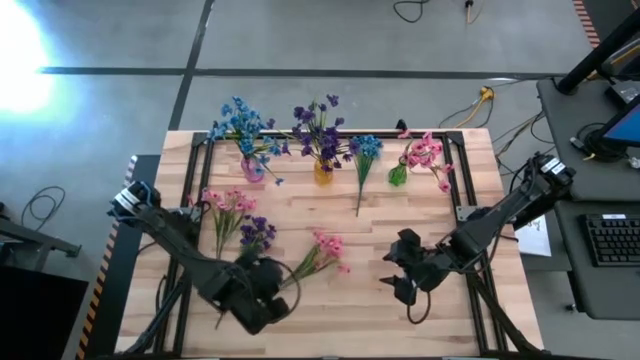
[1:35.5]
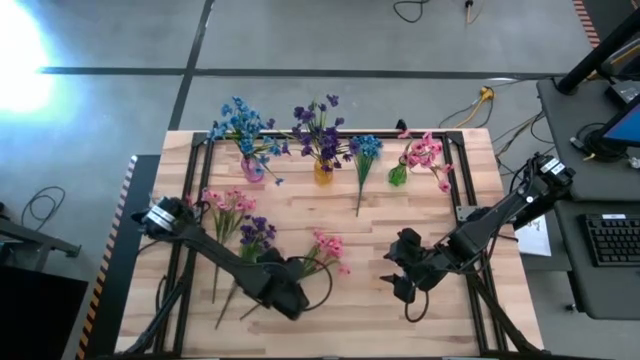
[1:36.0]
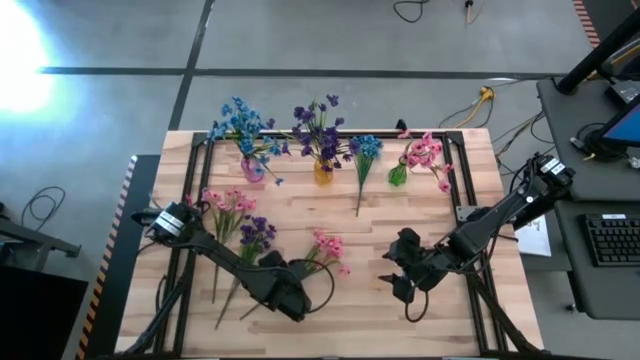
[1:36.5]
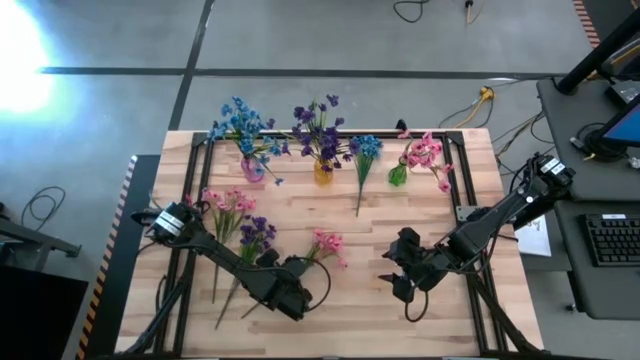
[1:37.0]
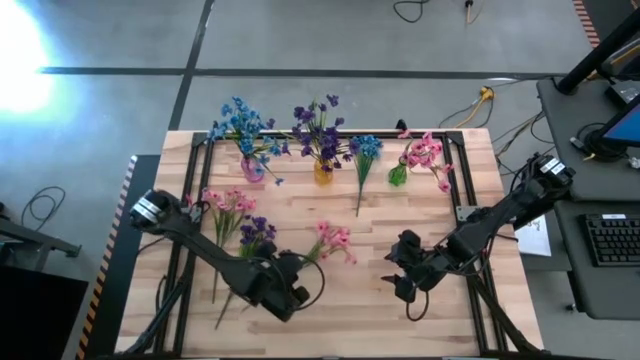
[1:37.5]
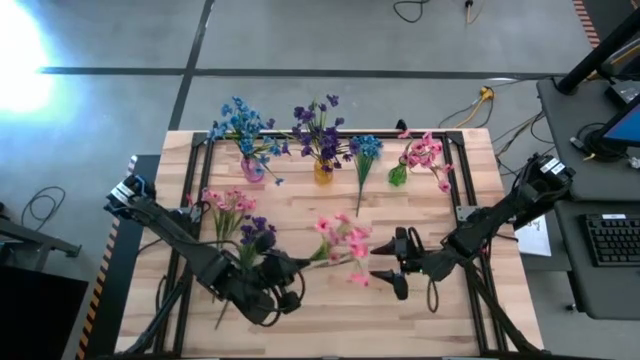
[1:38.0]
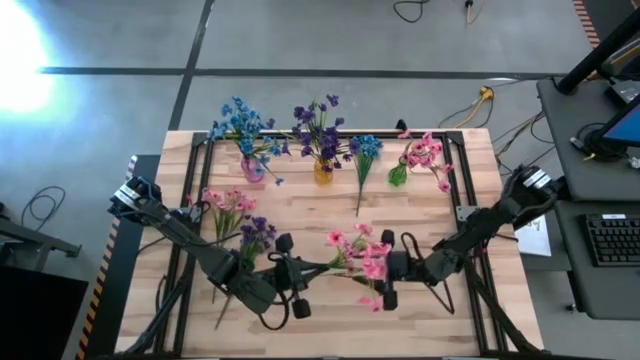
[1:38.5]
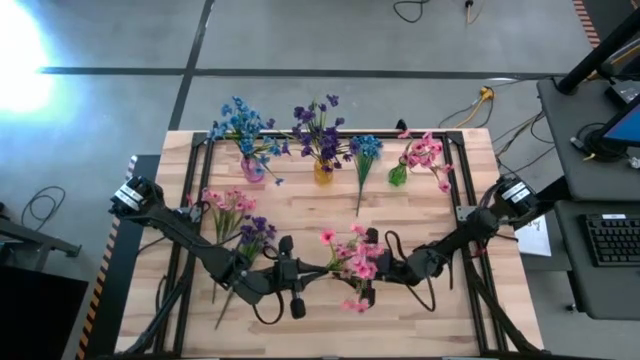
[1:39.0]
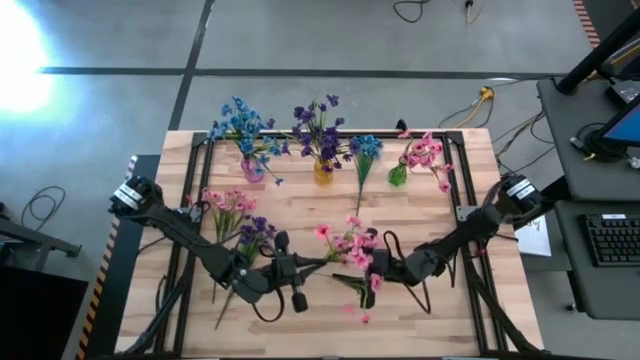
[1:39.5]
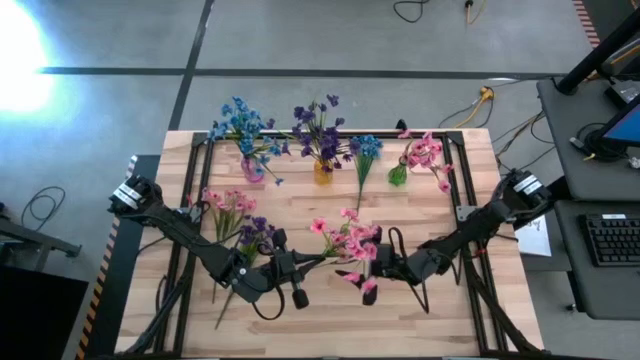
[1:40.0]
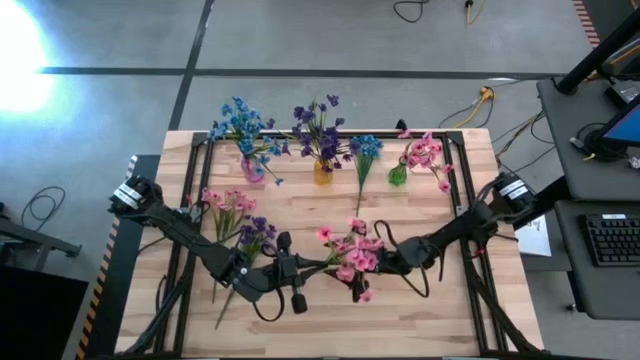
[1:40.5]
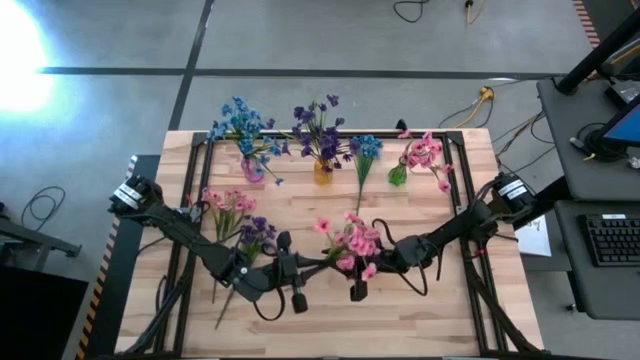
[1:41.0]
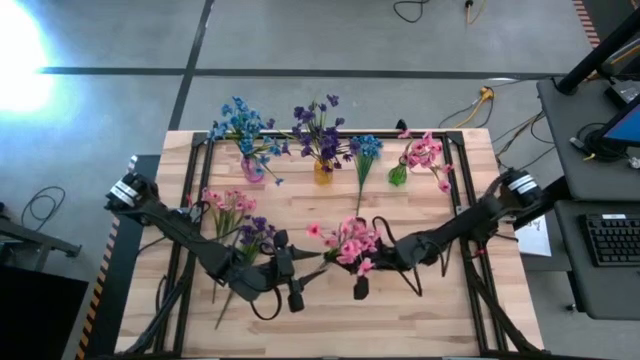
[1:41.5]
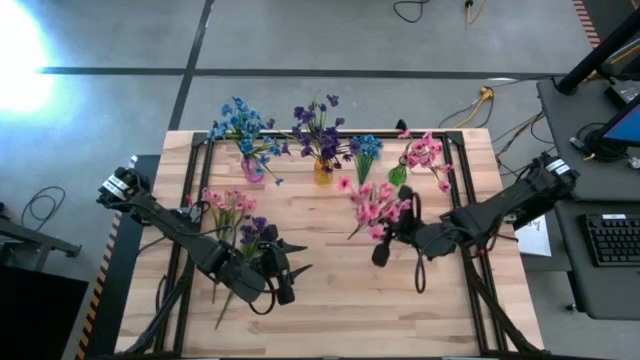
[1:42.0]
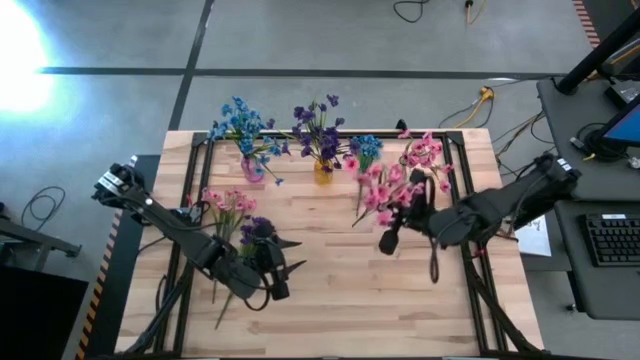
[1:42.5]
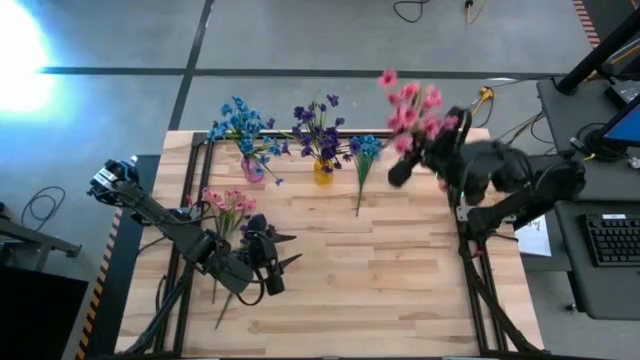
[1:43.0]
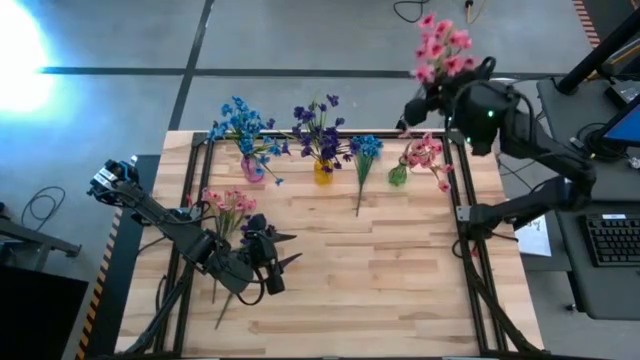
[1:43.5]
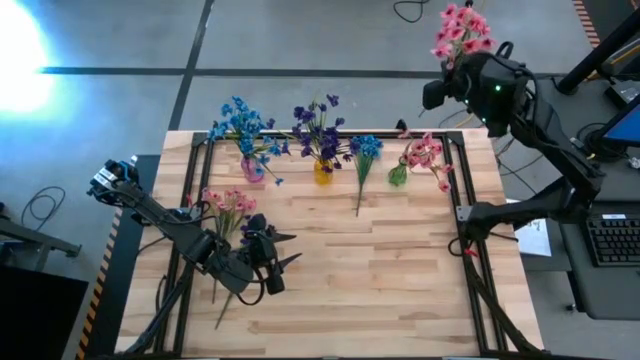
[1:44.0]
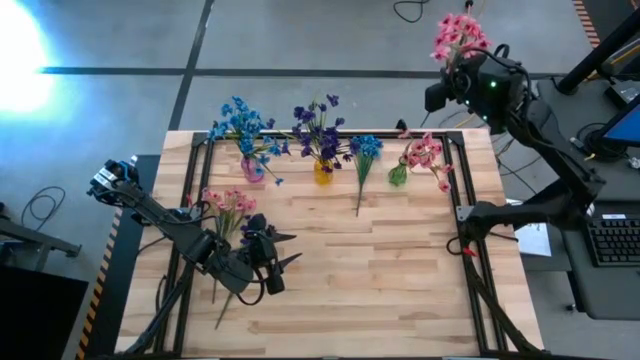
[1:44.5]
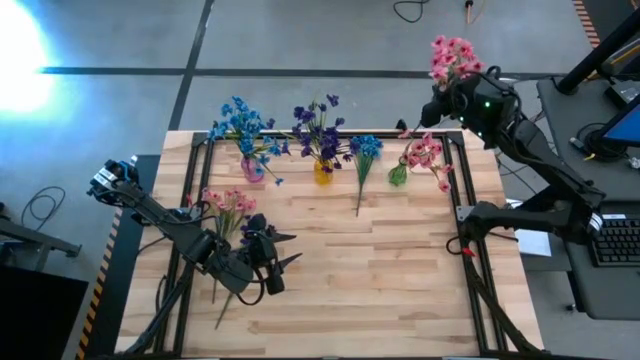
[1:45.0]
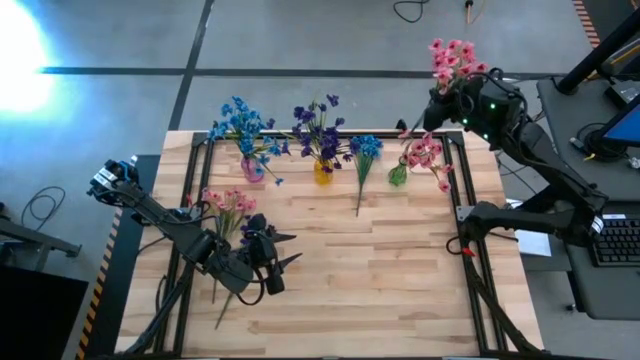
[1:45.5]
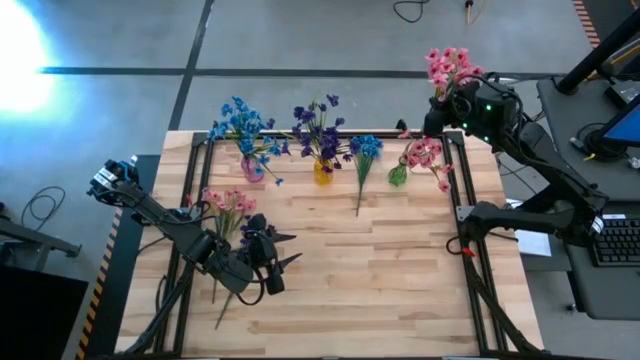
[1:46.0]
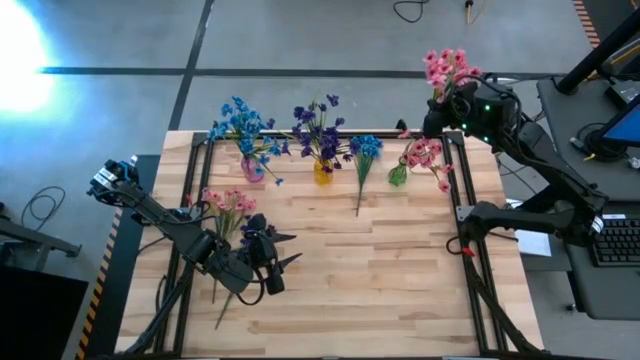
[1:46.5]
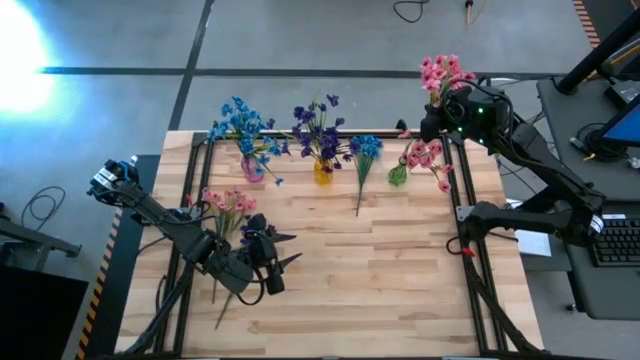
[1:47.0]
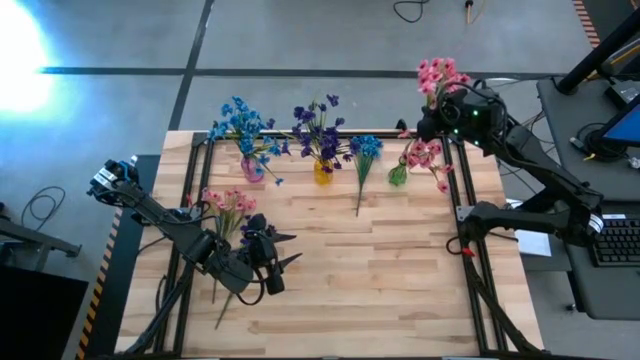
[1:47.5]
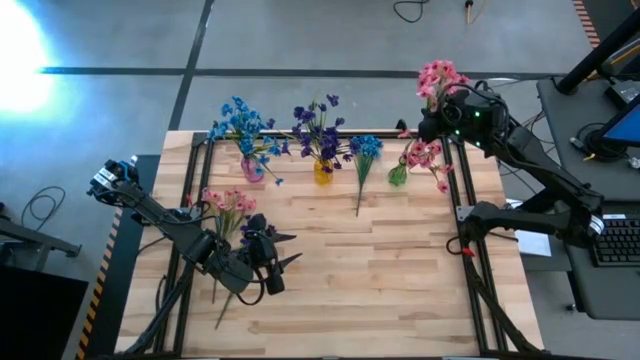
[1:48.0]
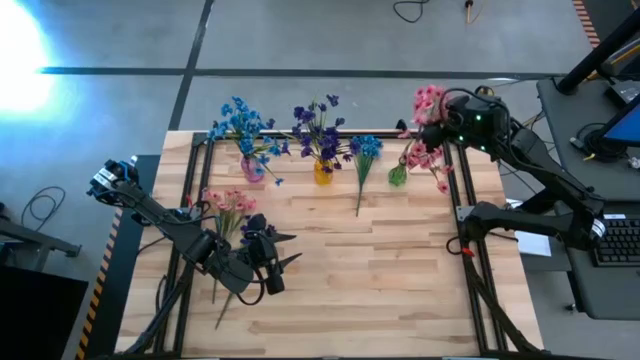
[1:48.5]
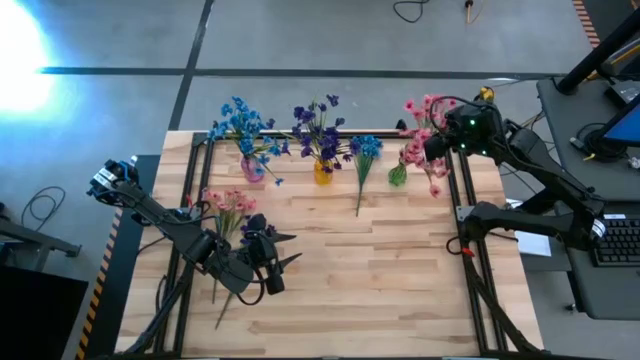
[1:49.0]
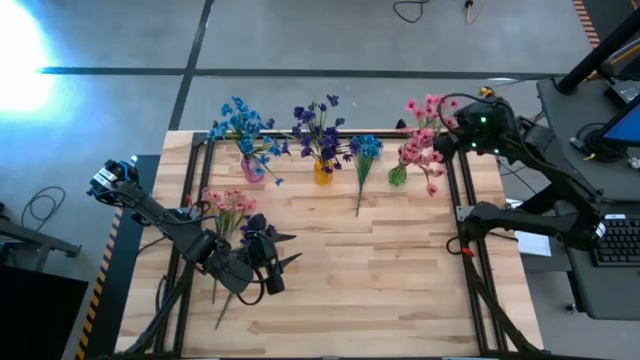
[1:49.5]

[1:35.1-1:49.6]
Task: Sort flowers into vase by color
Put the right pink flowers into the green vase

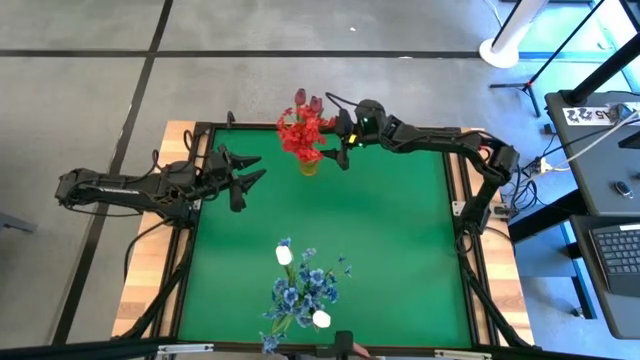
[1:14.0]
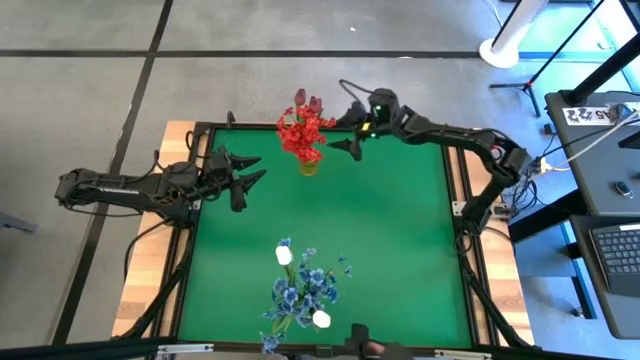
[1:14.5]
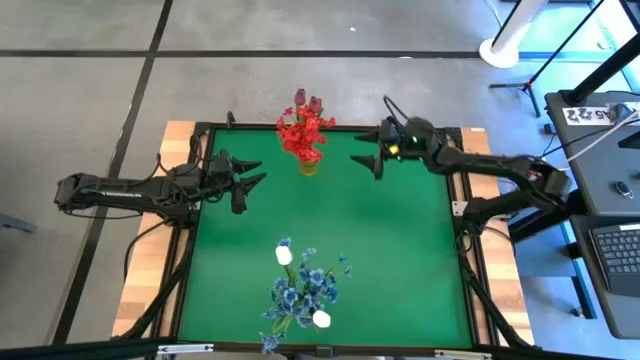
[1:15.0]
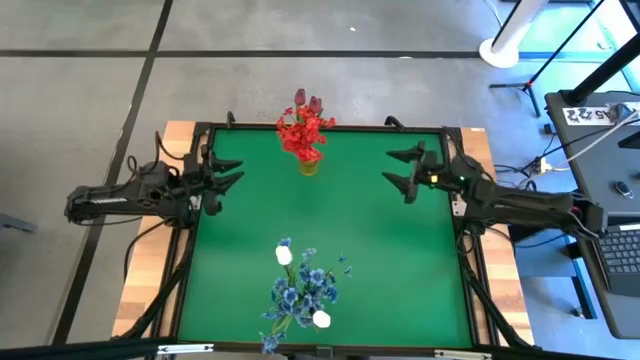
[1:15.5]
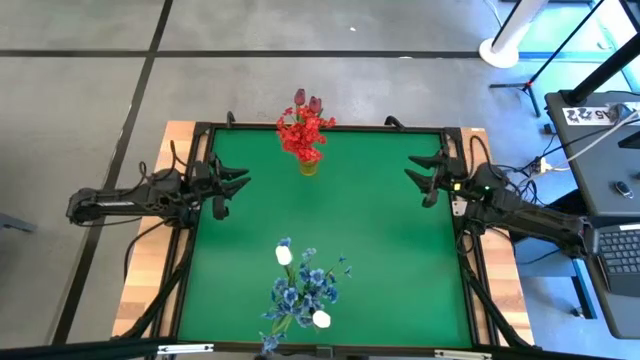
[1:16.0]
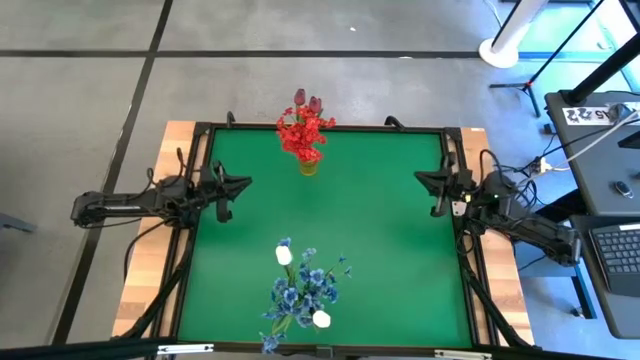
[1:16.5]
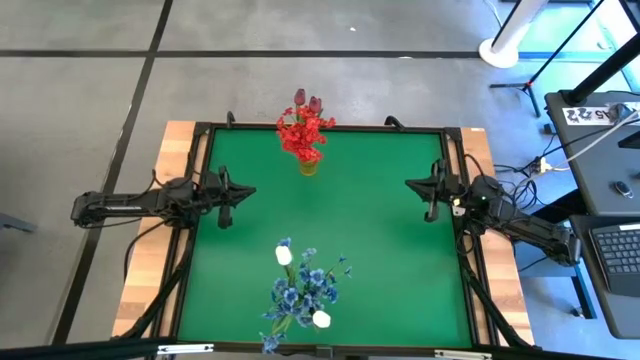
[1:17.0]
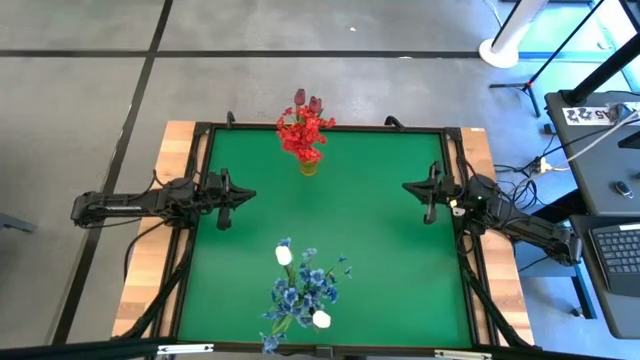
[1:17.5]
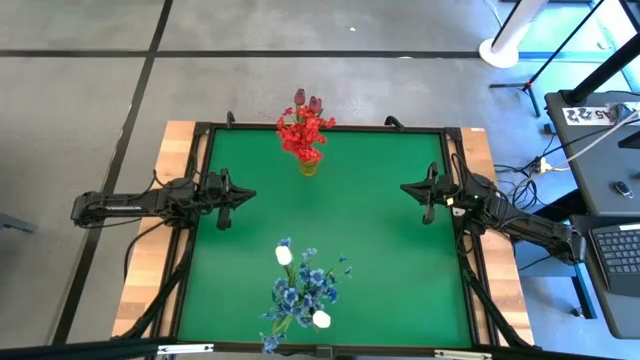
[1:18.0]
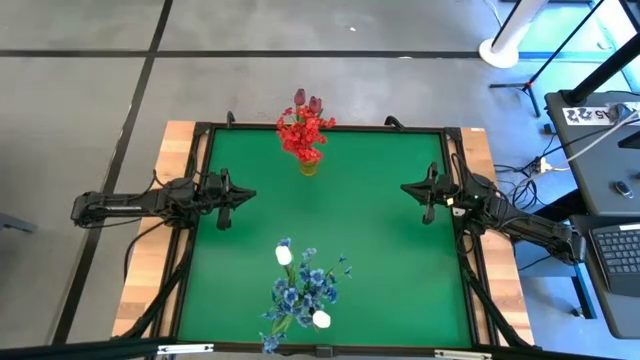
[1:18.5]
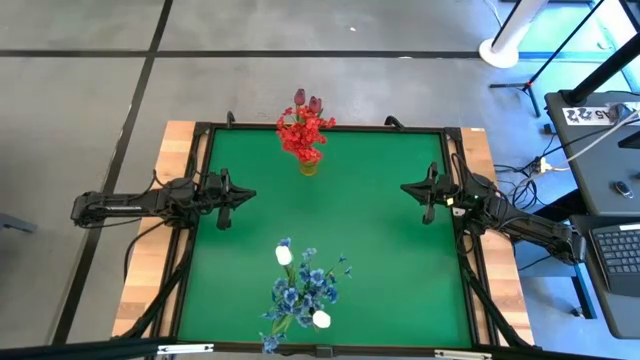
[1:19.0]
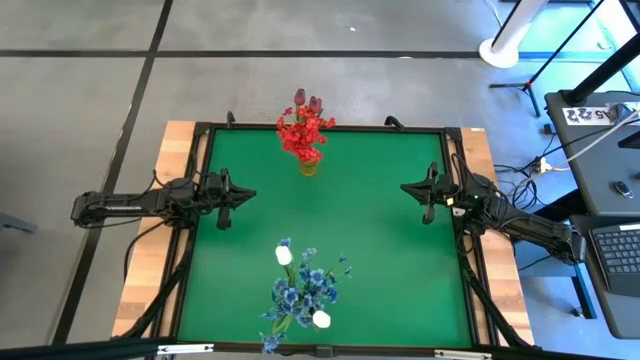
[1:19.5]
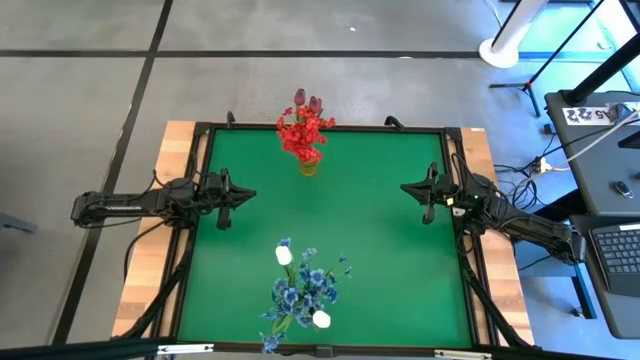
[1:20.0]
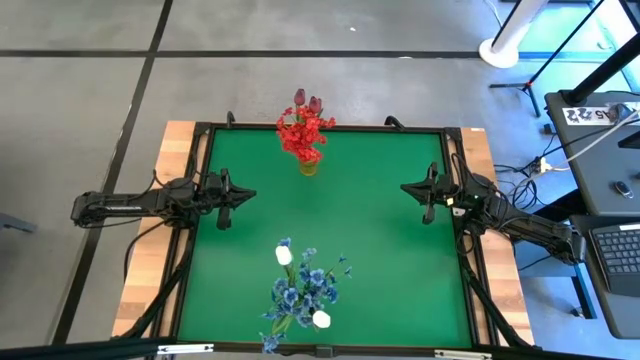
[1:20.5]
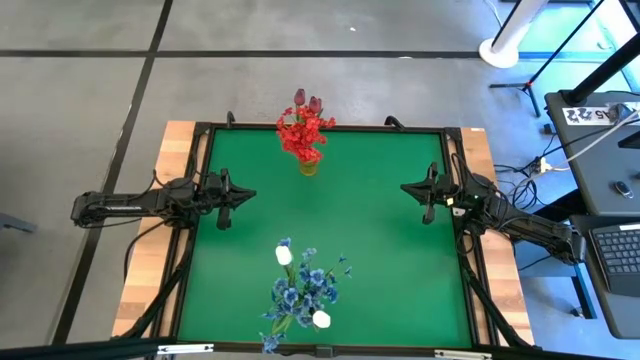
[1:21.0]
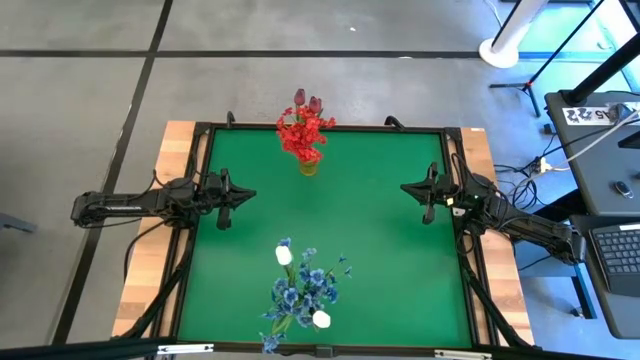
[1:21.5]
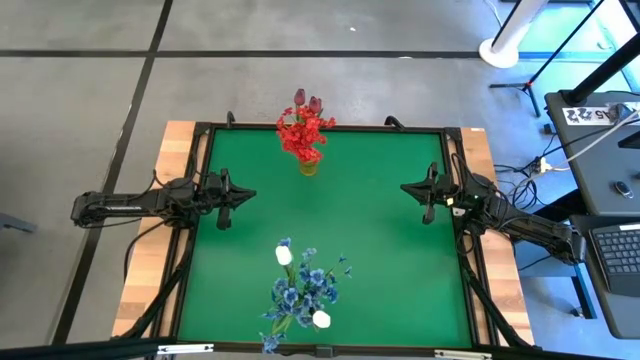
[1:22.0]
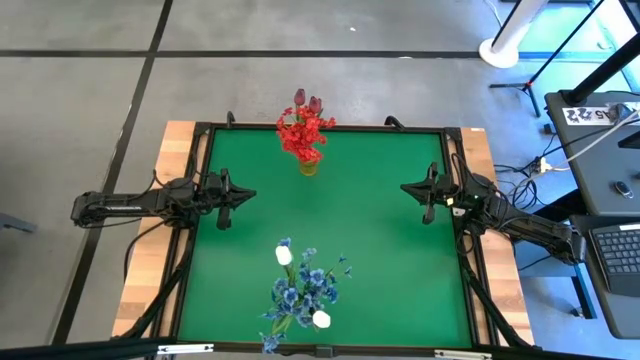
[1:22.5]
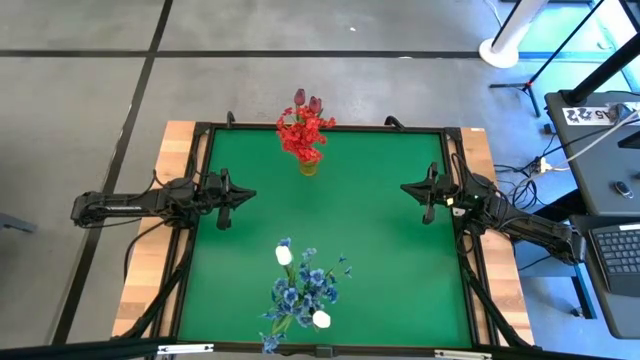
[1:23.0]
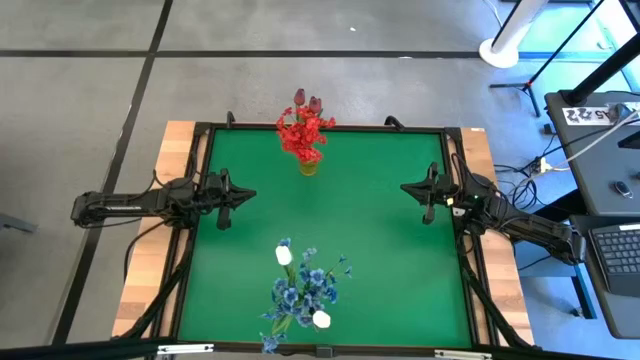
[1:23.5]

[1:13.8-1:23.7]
Task: Sort flowers into vase by color
Return to Home Position
